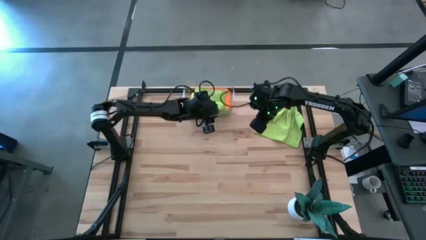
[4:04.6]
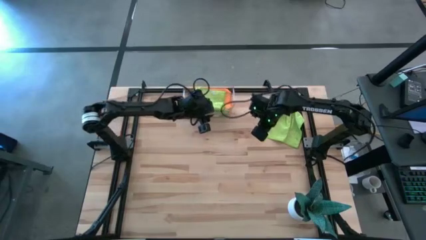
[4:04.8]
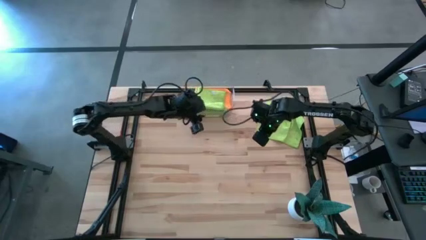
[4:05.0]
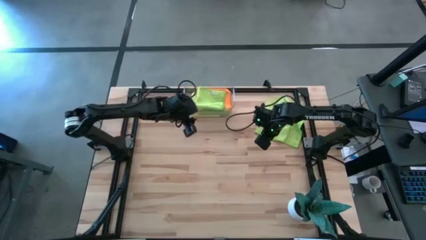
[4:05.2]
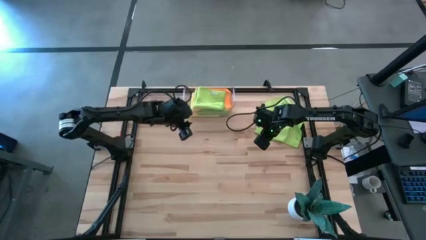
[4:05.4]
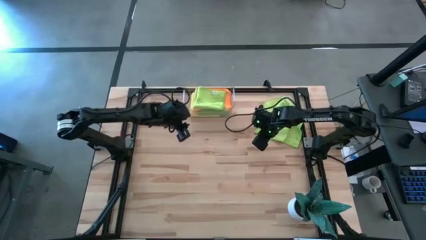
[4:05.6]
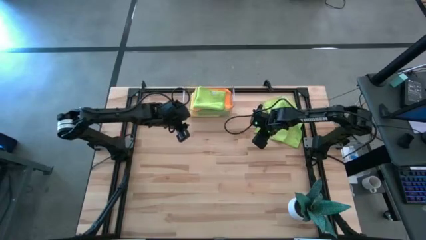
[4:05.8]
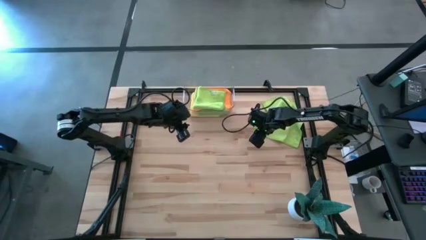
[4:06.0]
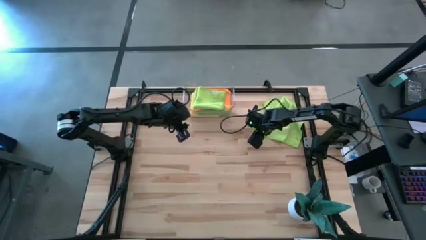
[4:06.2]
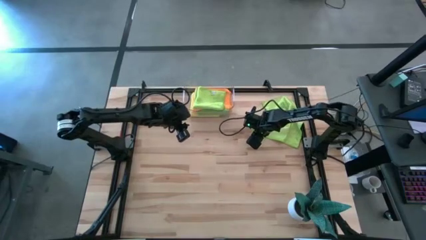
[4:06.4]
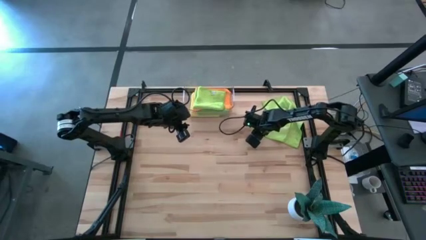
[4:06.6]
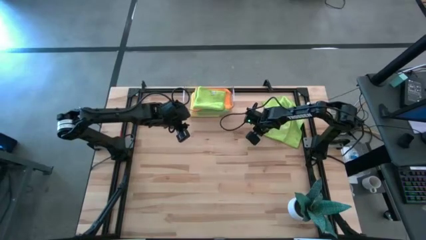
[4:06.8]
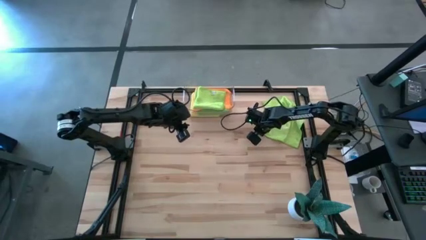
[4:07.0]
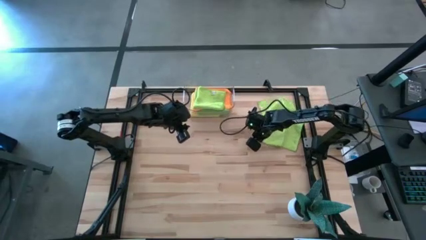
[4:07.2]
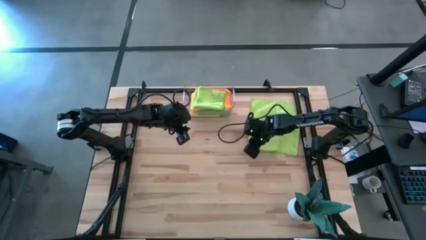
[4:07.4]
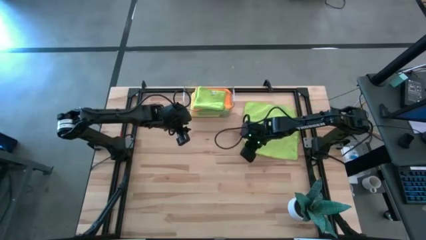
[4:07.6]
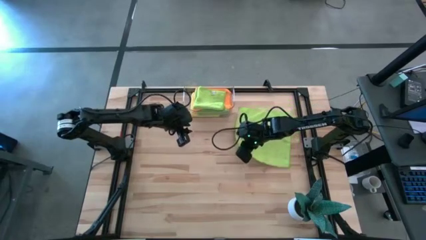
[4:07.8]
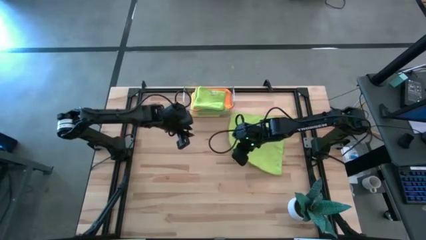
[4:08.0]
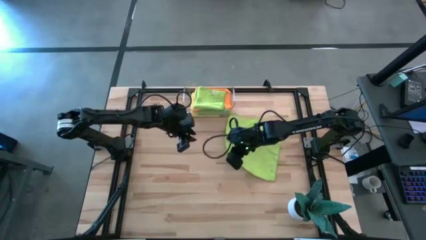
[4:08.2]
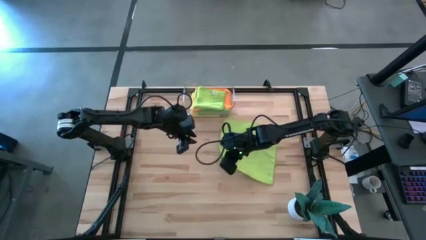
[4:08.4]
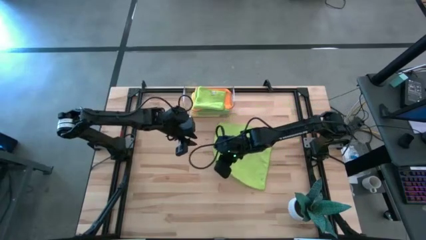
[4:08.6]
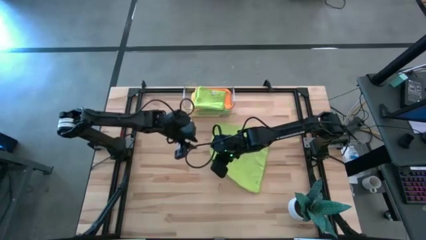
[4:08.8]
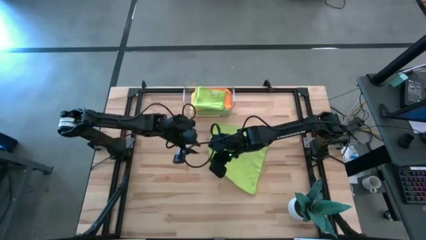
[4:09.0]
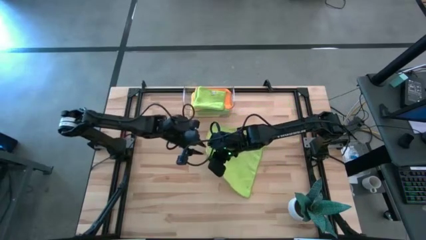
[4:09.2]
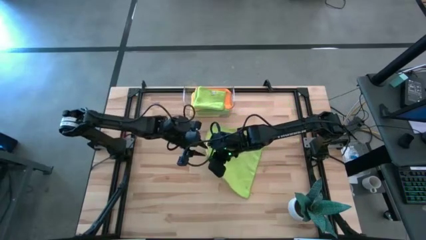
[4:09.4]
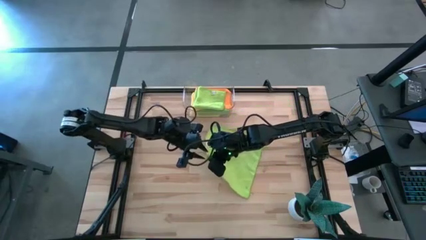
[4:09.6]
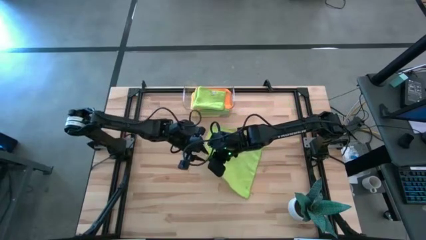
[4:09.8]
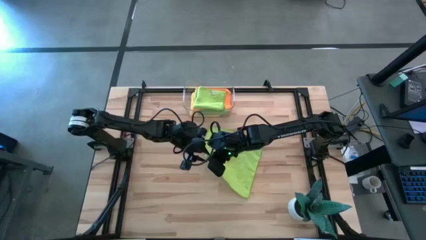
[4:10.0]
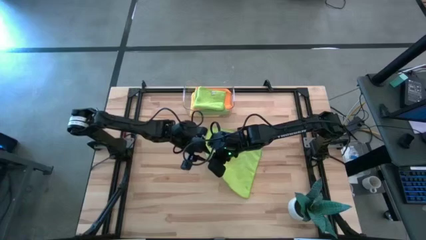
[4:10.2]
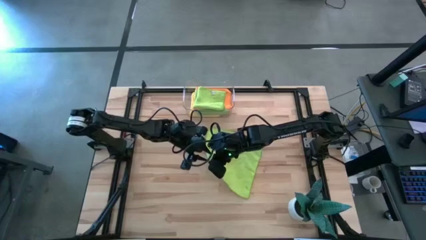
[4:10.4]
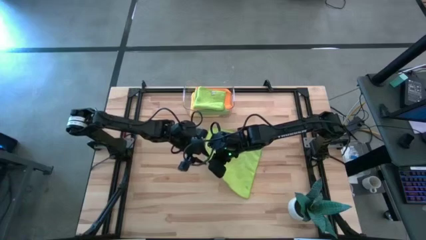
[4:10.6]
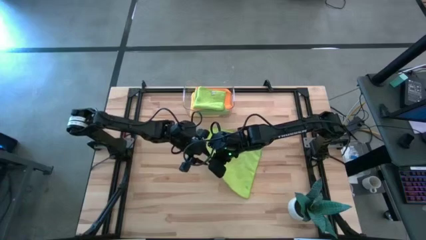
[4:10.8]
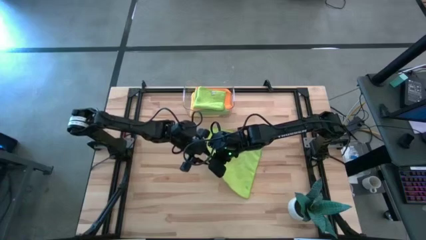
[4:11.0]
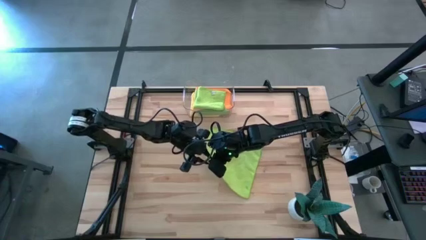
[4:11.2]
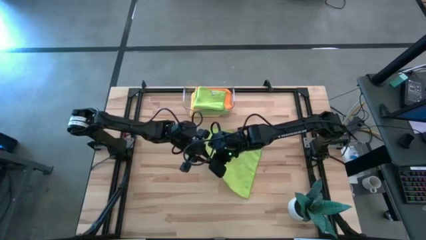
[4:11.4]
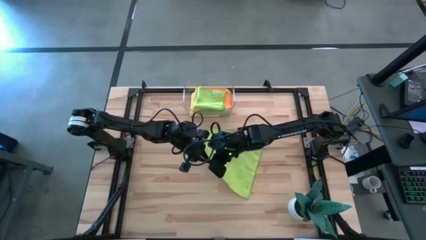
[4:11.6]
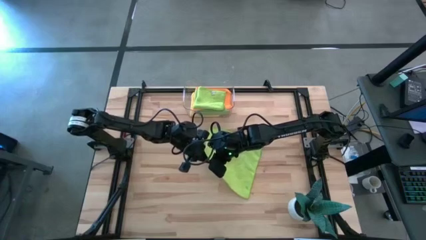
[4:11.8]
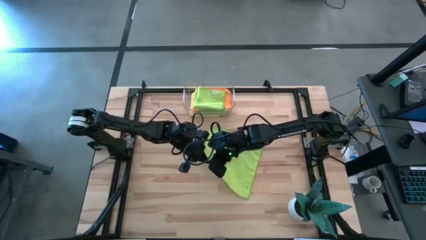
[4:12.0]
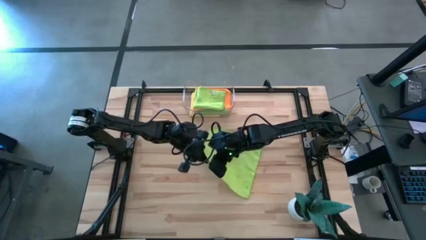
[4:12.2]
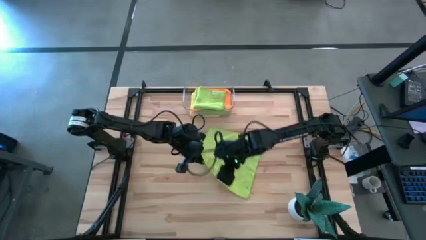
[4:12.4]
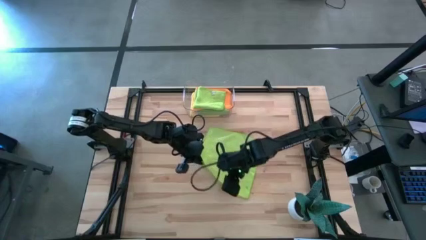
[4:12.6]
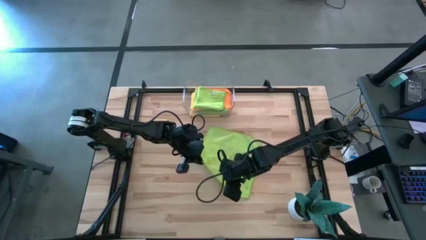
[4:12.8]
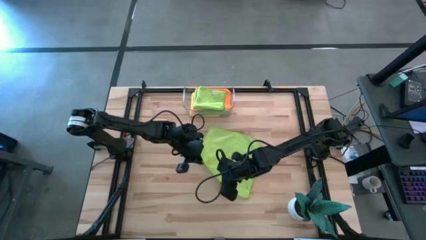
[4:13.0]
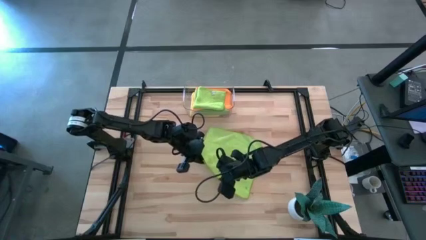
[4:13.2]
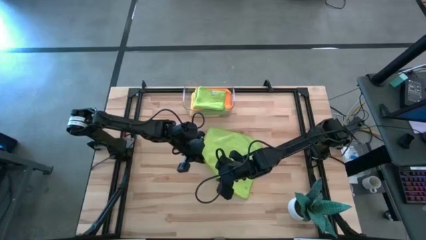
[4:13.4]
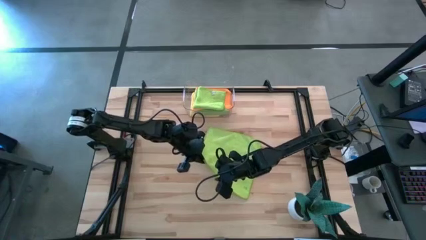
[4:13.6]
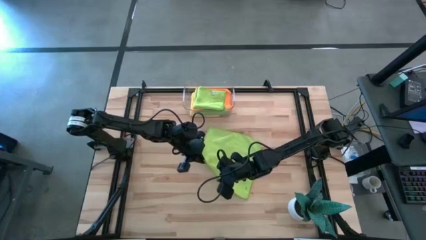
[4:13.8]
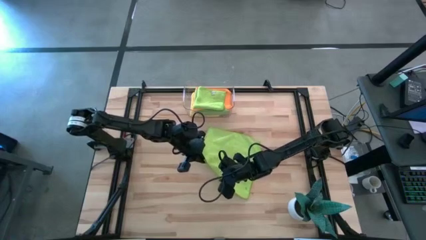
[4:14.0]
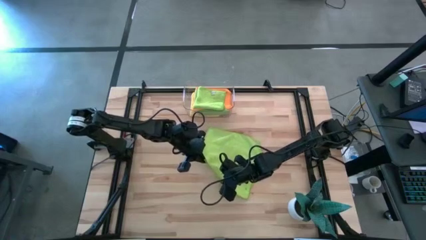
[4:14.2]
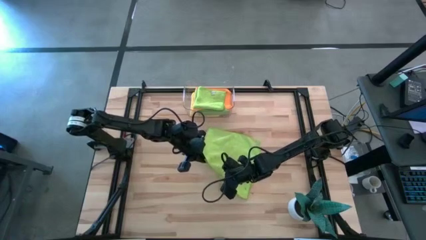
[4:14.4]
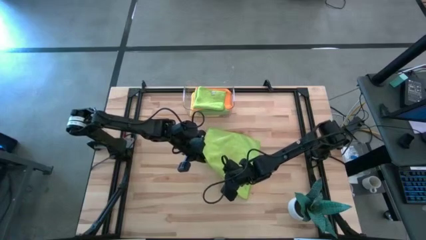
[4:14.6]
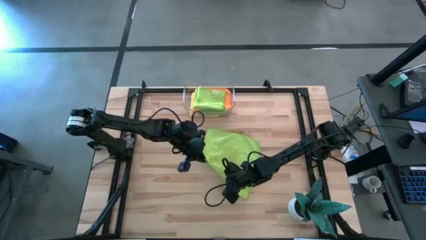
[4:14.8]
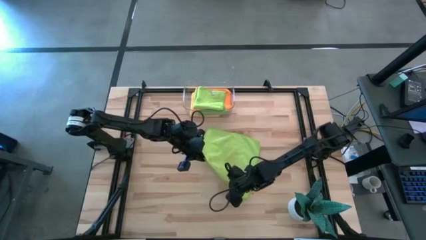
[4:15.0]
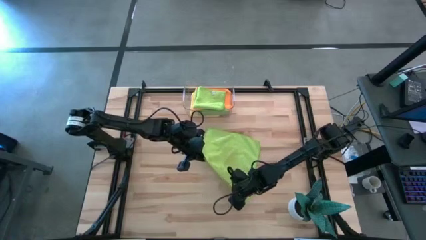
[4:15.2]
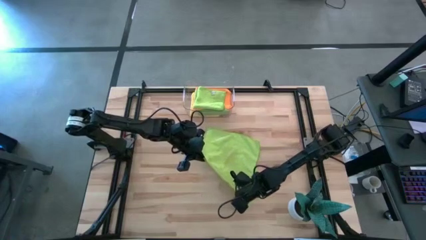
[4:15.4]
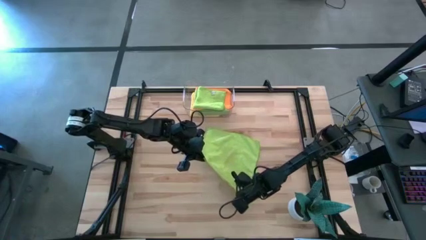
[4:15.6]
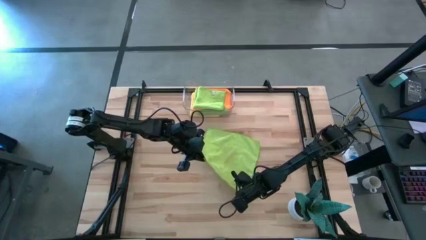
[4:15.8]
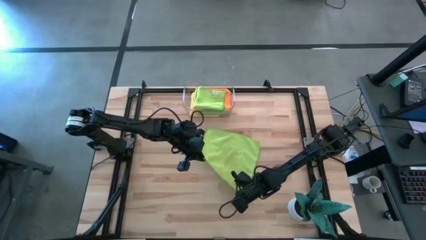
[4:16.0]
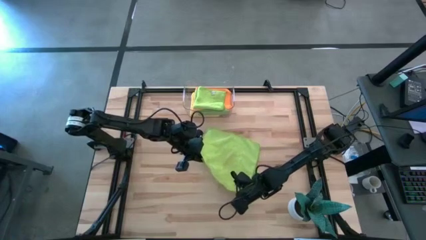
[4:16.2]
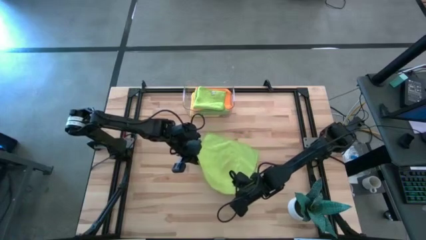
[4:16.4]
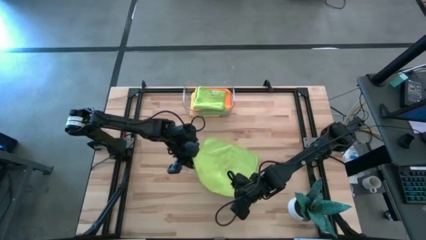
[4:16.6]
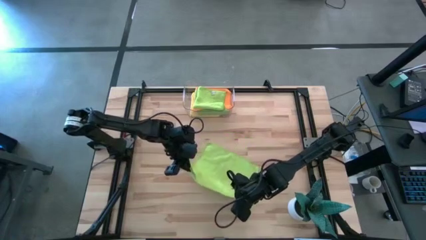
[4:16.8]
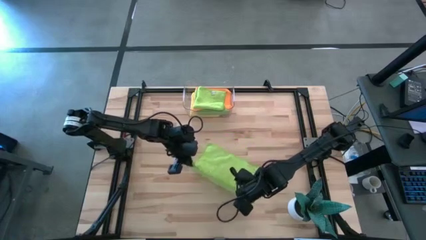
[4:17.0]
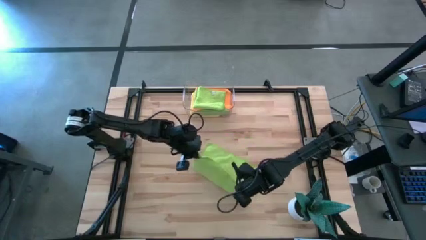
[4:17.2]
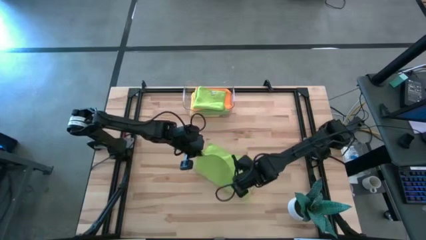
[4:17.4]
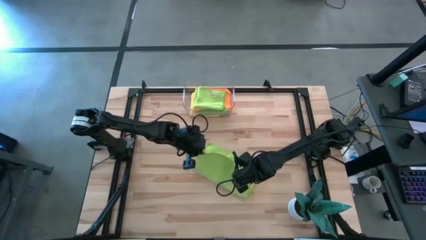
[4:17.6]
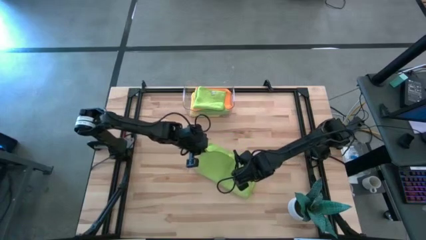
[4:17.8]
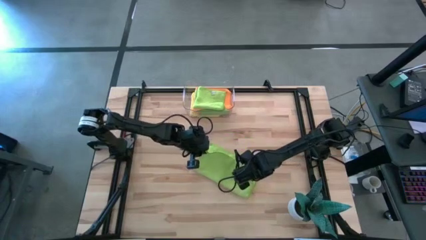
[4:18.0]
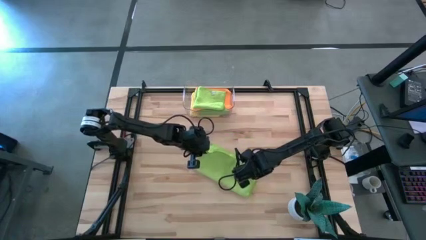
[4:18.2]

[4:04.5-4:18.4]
Task: Fold microfiber towels
Fold the light green microfiber cloth
